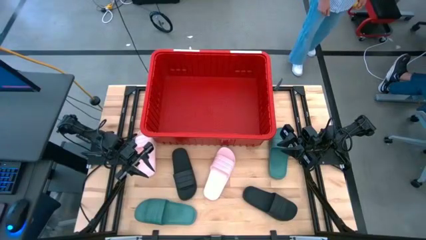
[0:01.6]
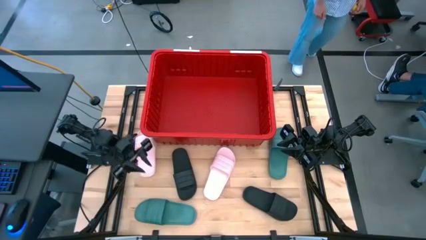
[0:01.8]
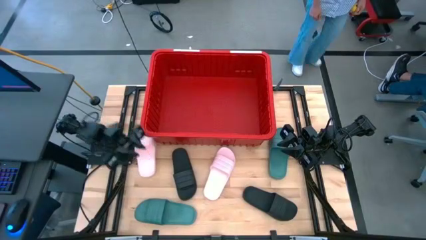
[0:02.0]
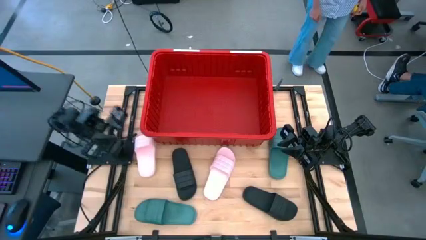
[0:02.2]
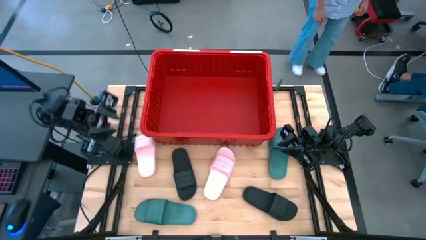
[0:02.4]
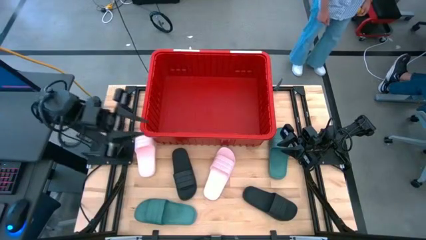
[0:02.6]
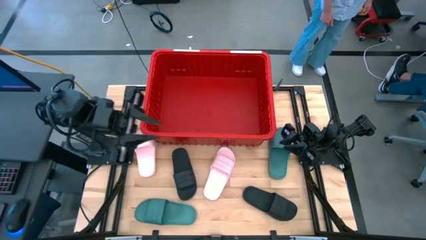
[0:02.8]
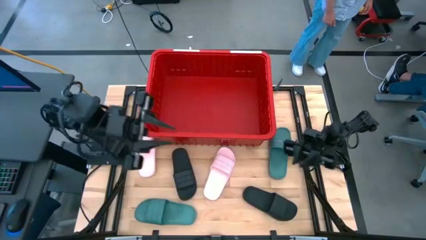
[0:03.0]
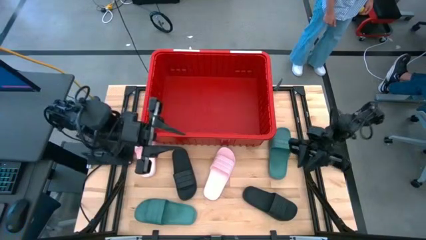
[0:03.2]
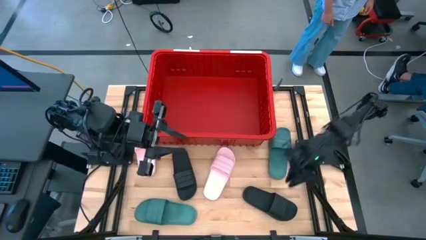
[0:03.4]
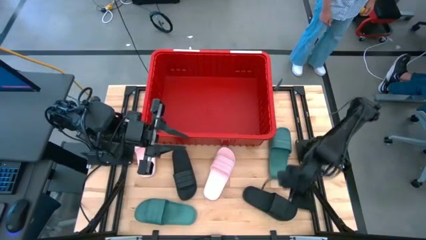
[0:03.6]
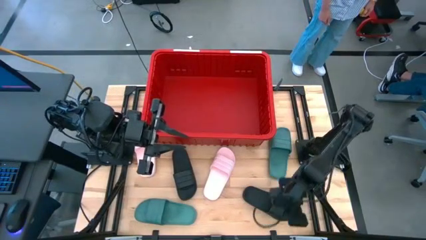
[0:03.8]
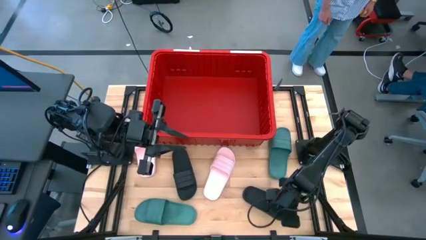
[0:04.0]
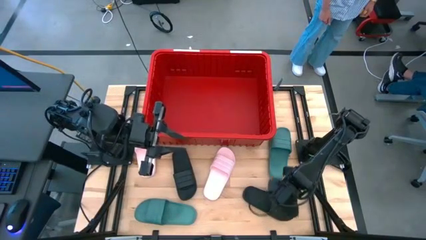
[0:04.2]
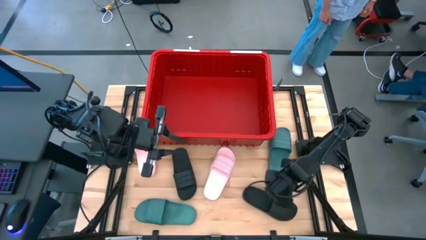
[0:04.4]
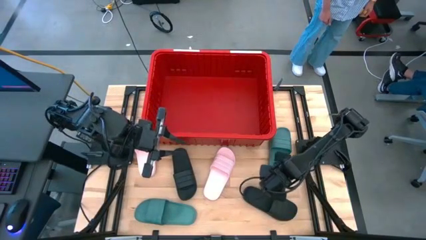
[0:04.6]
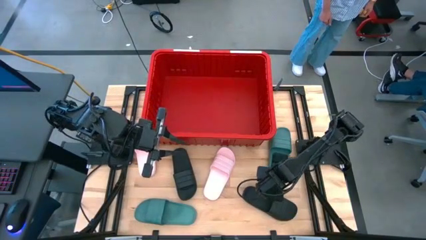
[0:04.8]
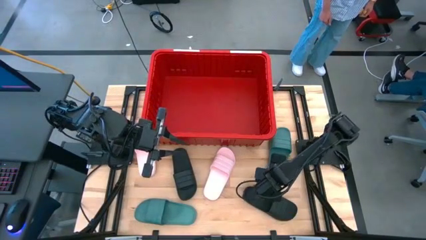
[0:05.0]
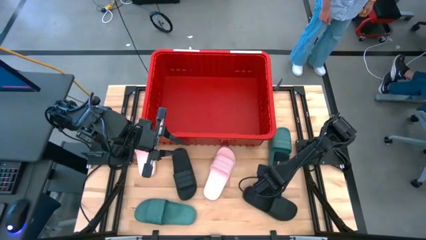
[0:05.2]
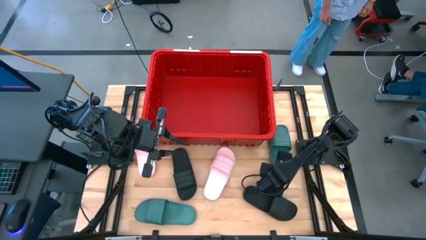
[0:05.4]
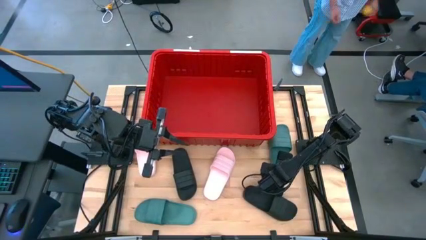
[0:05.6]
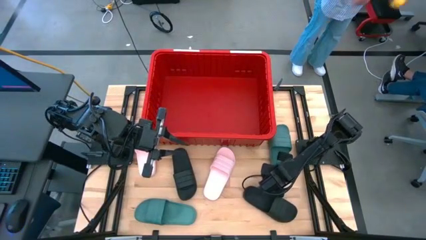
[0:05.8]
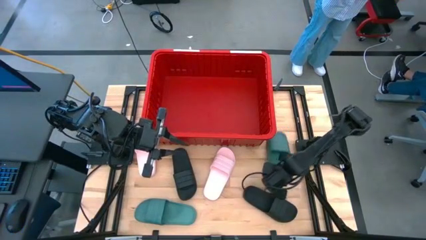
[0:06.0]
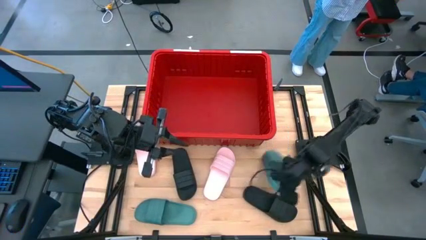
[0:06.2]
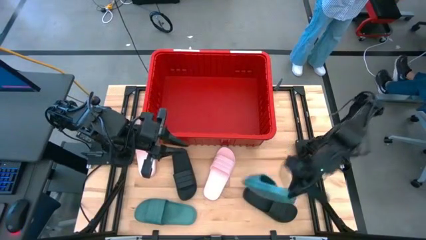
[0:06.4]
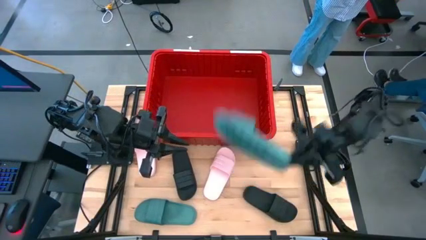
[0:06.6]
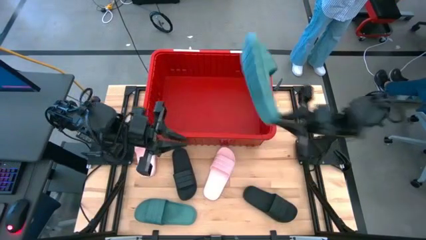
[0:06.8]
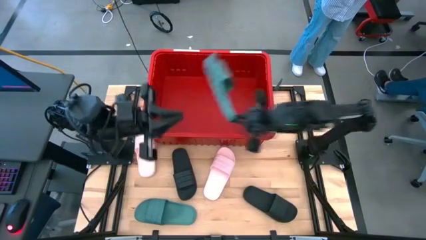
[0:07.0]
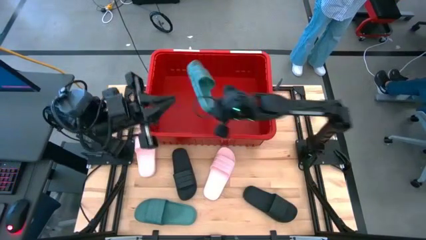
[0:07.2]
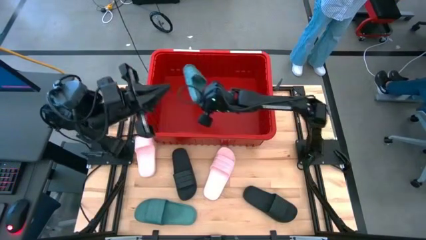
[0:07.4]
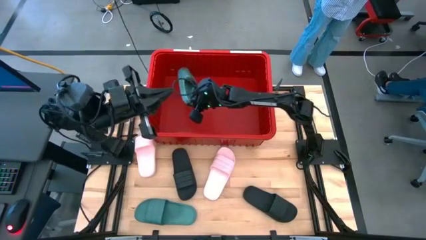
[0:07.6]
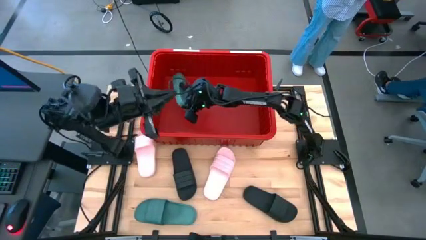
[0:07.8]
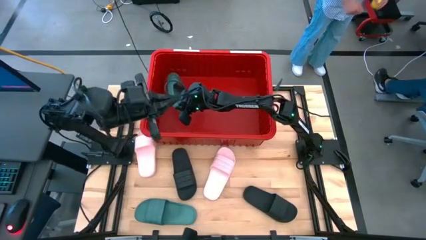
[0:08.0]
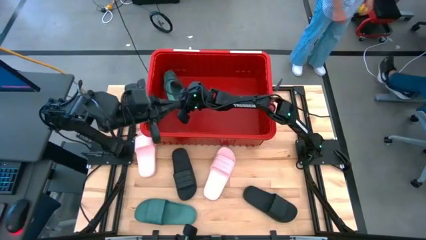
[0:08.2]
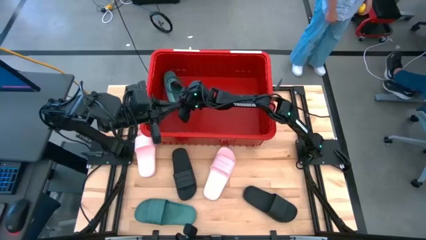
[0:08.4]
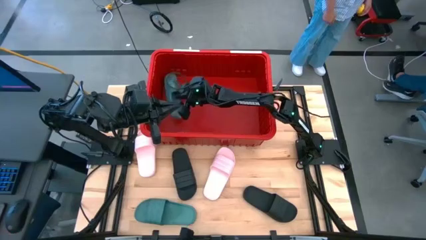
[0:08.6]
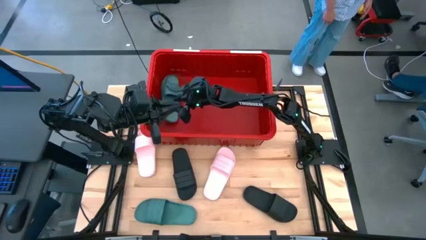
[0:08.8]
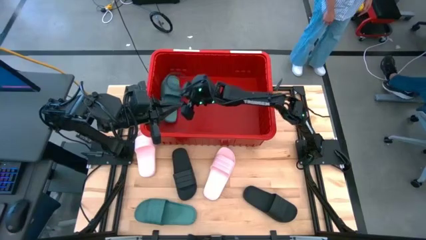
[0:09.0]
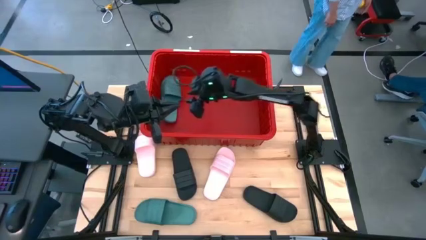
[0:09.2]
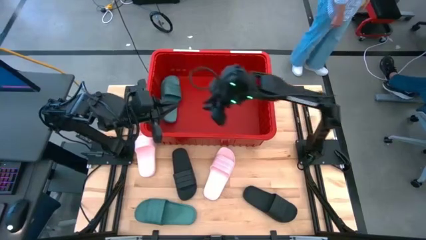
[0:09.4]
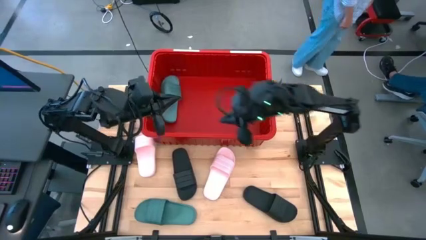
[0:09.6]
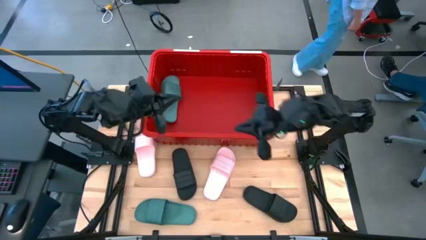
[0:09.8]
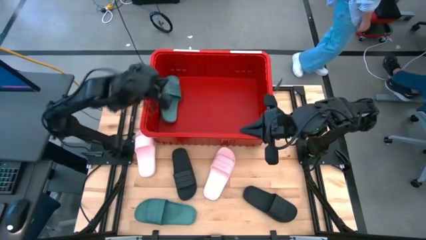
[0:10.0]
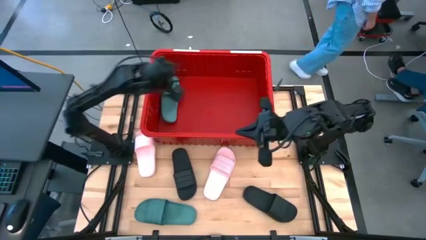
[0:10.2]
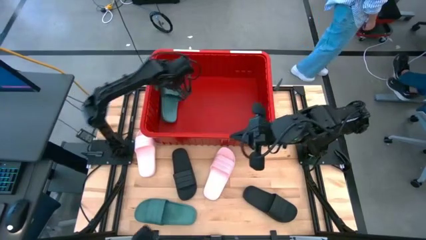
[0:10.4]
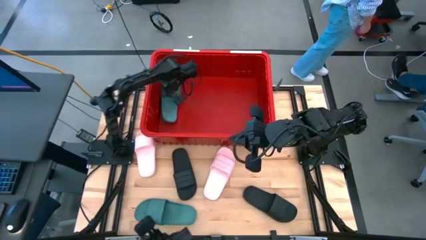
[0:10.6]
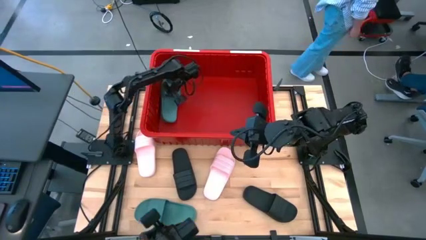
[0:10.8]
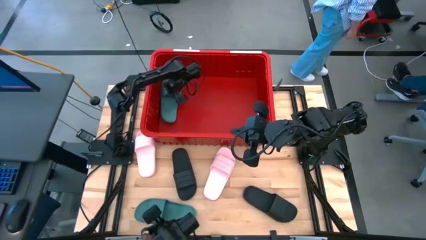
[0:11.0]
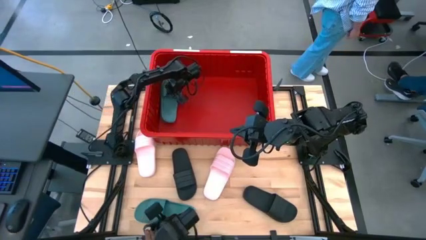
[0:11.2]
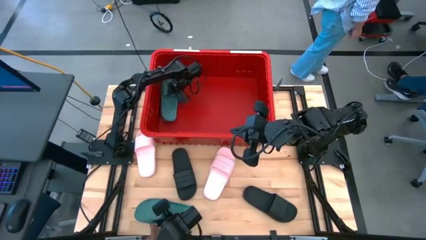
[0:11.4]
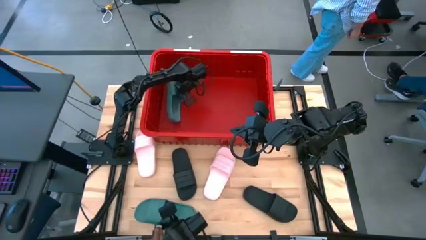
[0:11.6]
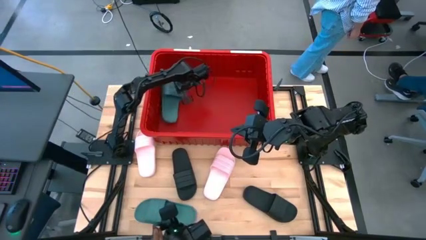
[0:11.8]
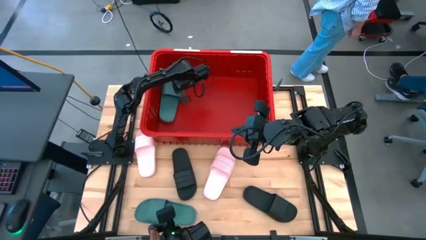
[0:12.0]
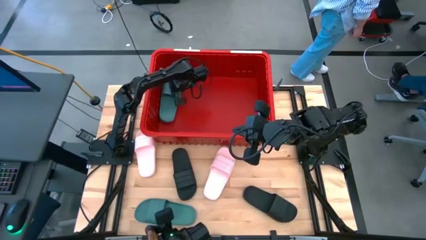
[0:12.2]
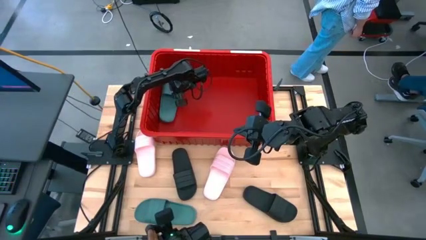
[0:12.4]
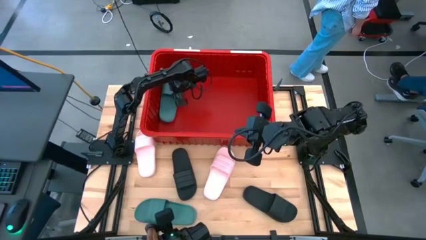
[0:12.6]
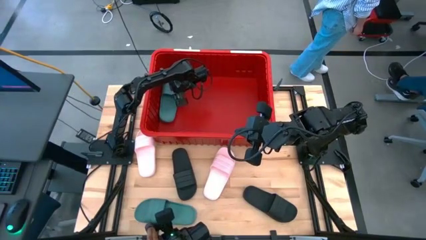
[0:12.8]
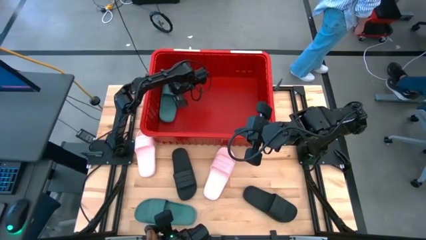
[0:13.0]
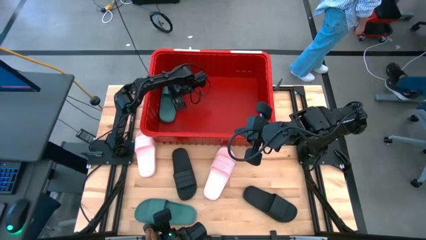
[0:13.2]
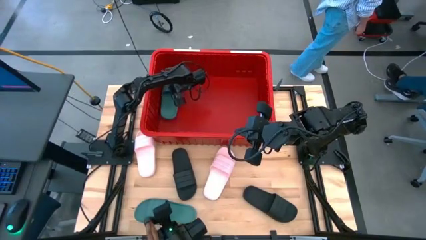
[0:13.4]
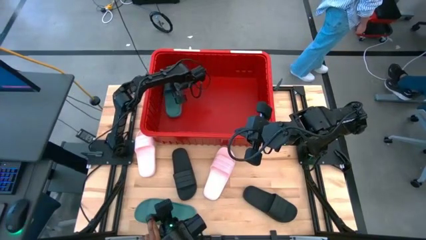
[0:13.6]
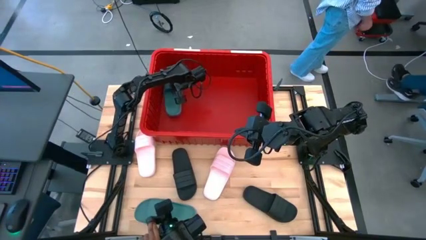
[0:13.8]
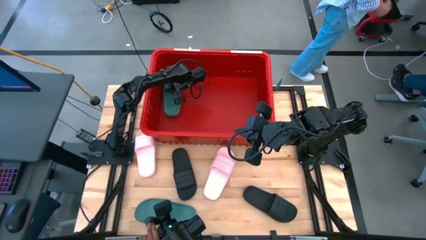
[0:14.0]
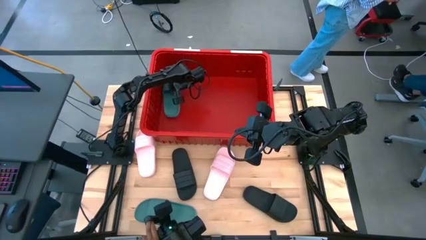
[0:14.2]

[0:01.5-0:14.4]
Task: Pick and place slides into bin
Put the right green slipper into the red bin

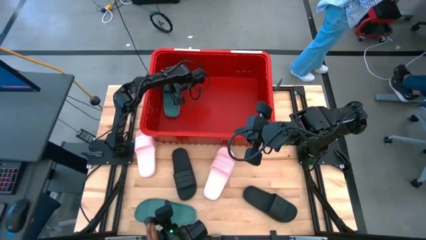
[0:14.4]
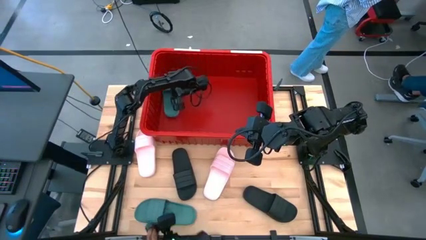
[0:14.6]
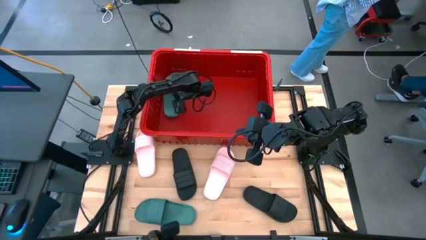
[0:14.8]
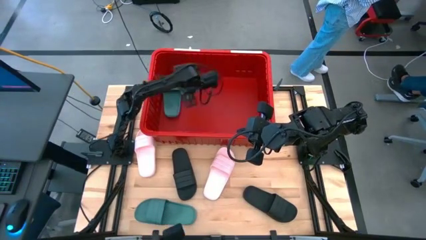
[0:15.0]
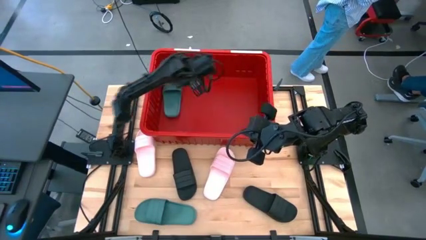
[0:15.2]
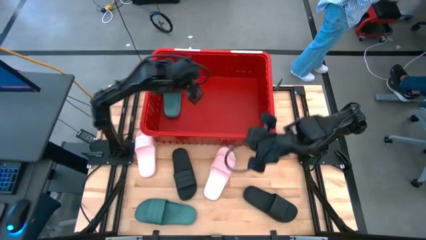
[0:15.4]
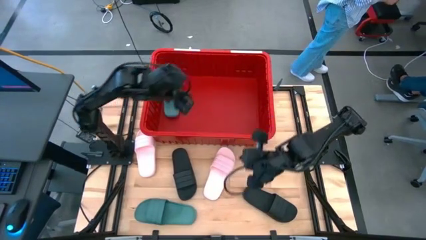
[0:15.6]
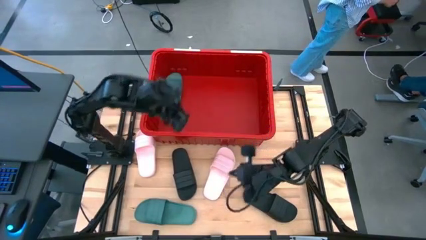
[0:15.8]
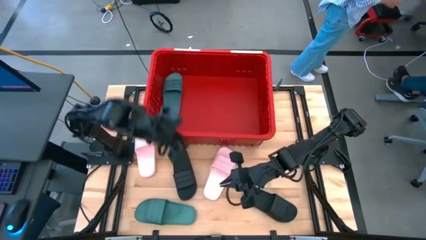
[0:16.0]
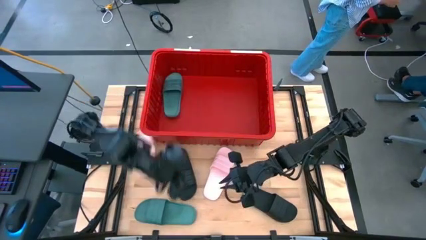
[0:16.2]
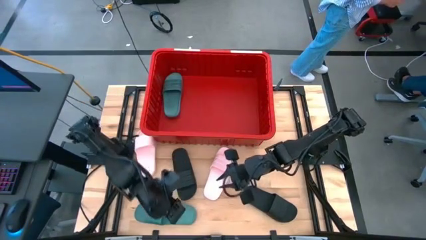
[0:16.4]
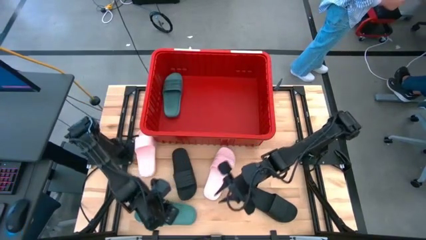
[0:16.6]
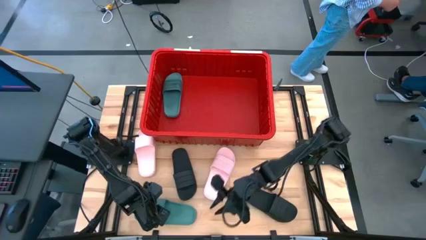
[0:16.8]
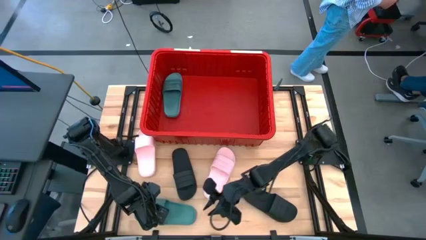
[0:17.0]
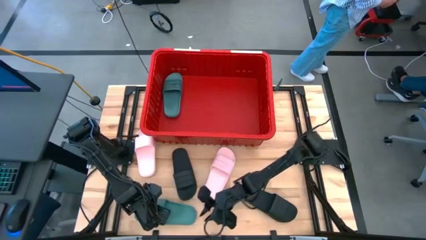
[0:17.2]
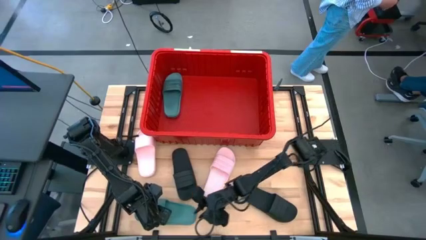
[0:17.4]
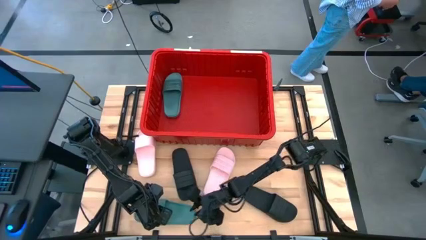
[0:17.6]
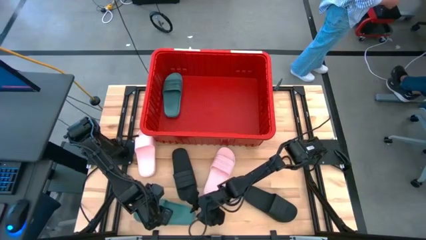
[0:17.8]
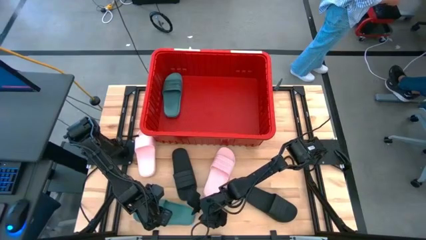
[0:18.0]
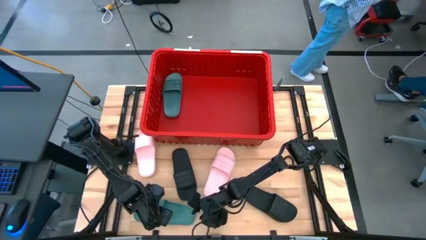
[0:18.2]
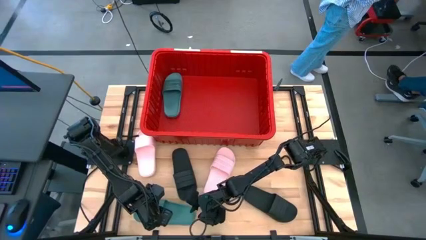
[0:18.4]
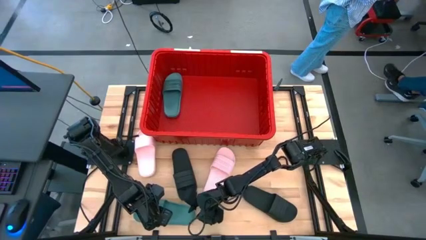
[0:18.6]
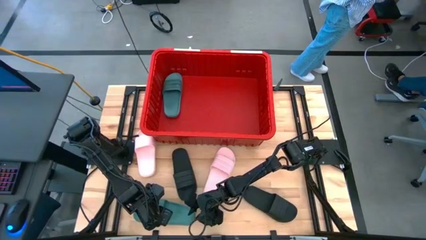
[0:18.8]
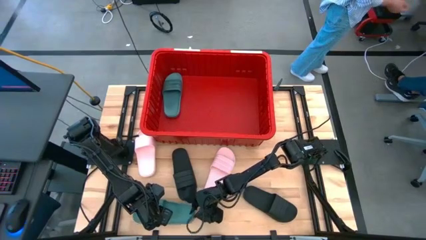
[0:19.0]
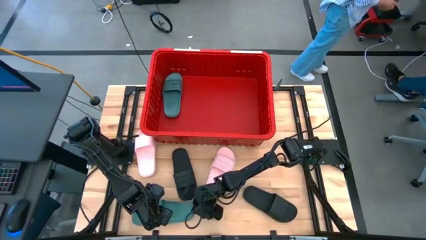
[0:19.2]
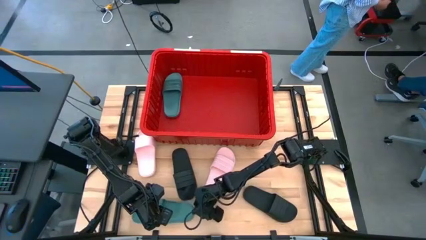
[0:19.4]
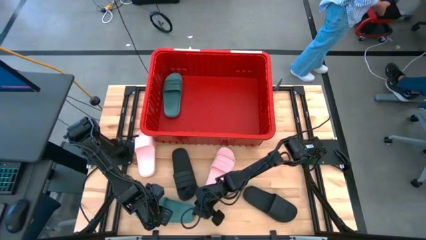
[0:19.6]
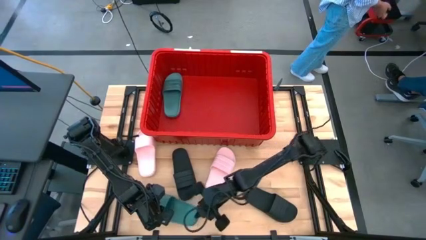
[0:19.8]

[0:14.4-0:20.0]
Put the green slipper into the red bin
